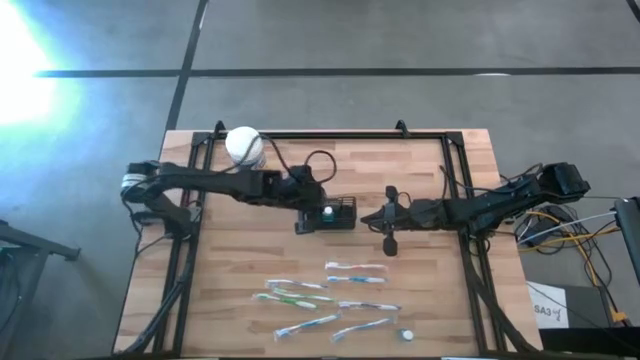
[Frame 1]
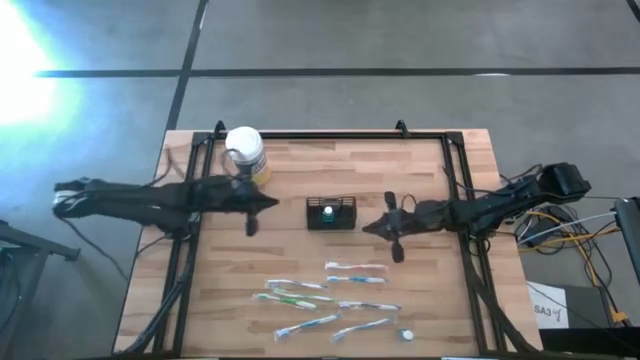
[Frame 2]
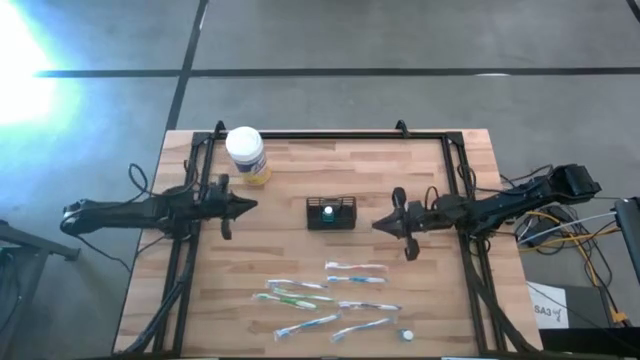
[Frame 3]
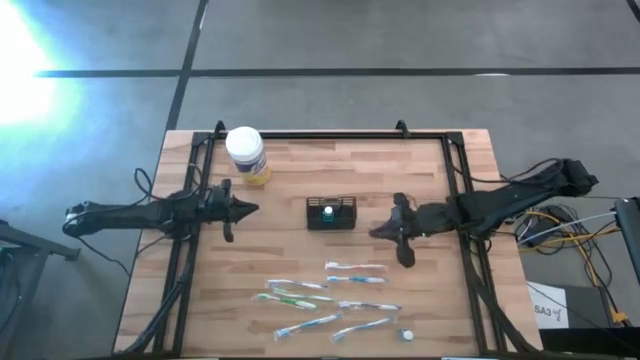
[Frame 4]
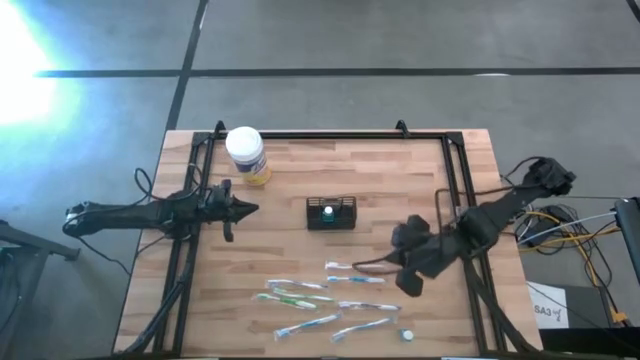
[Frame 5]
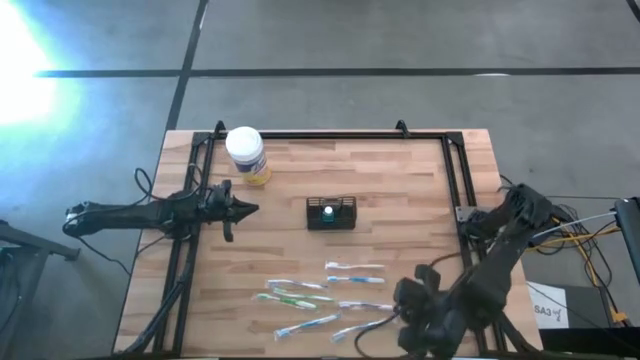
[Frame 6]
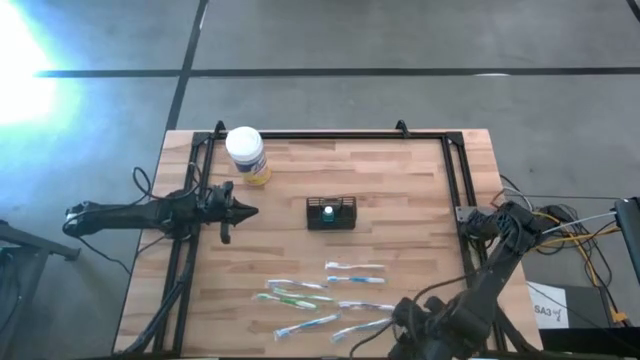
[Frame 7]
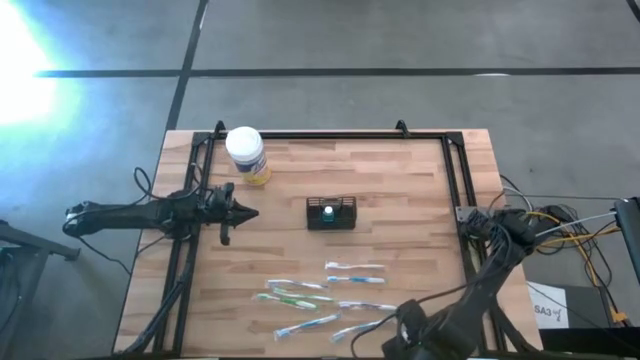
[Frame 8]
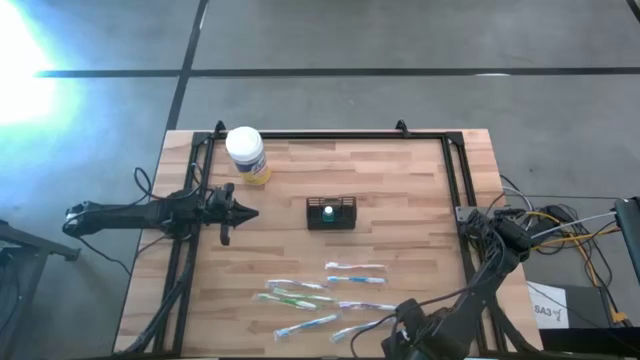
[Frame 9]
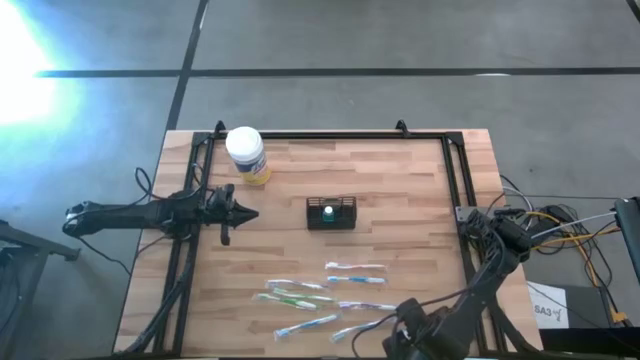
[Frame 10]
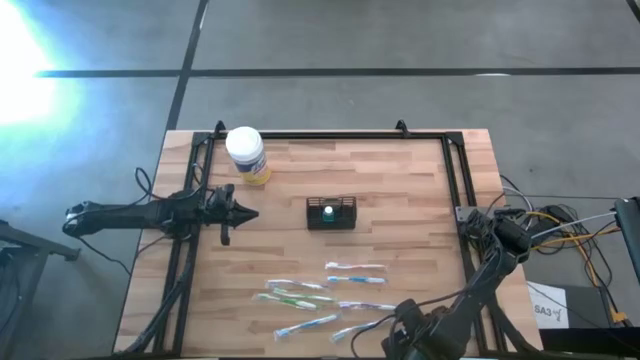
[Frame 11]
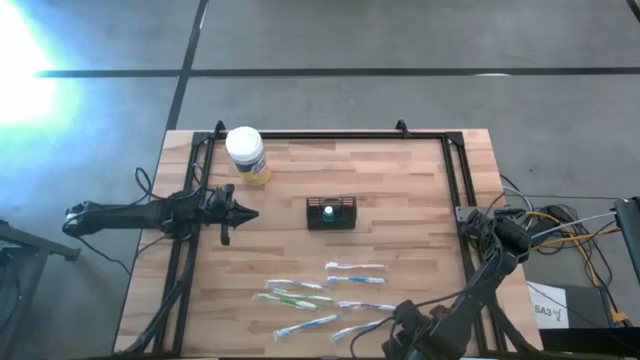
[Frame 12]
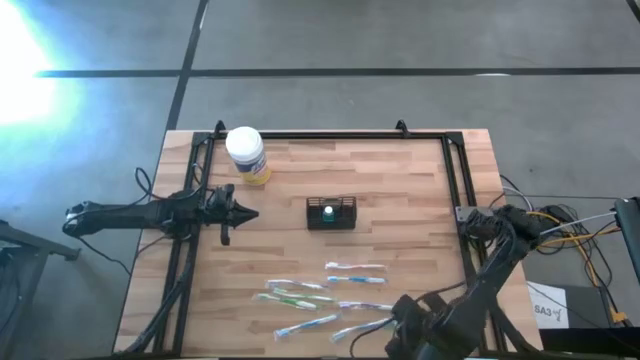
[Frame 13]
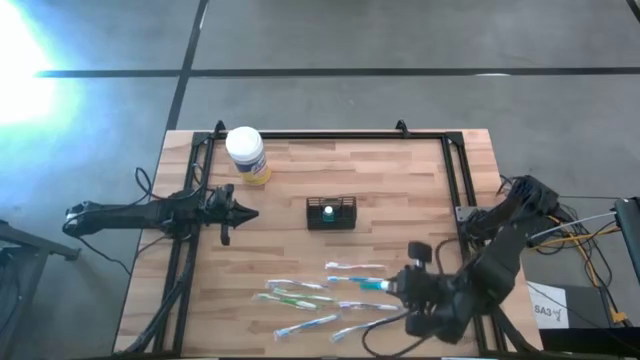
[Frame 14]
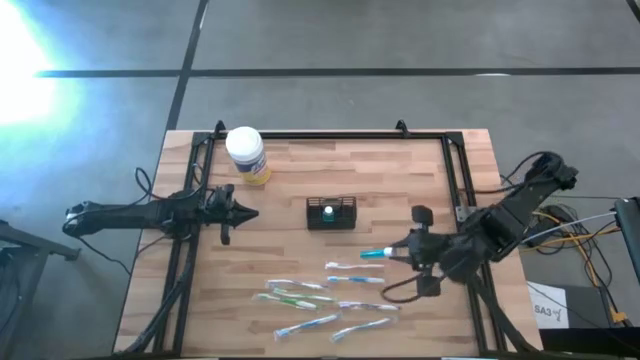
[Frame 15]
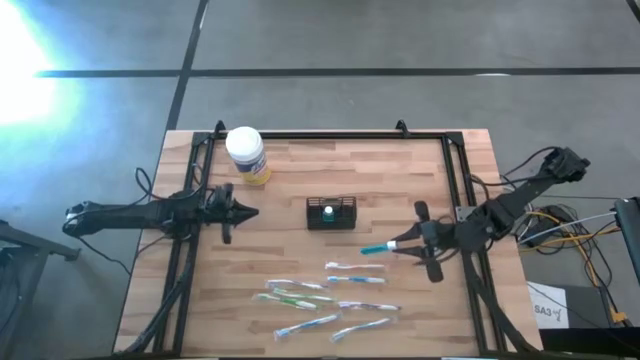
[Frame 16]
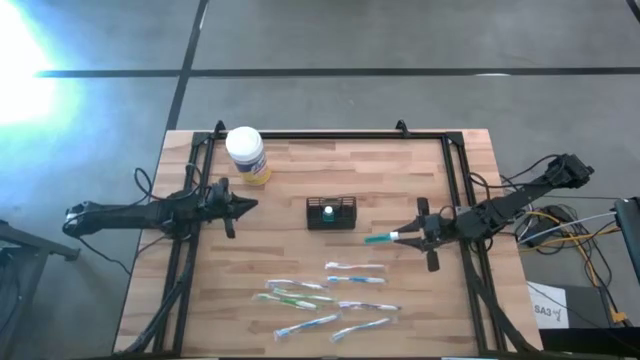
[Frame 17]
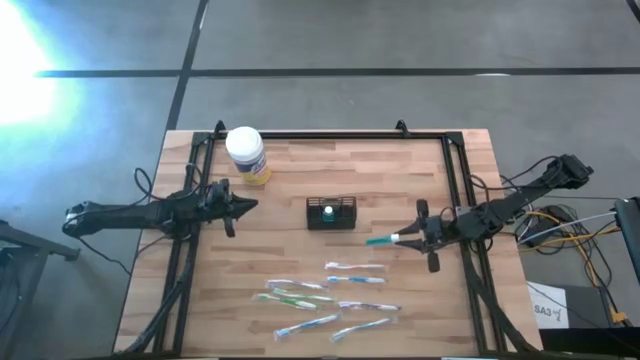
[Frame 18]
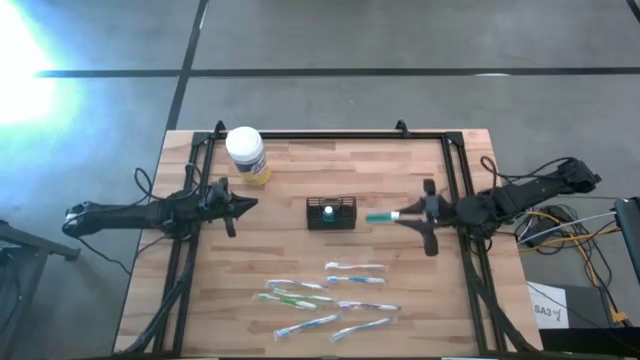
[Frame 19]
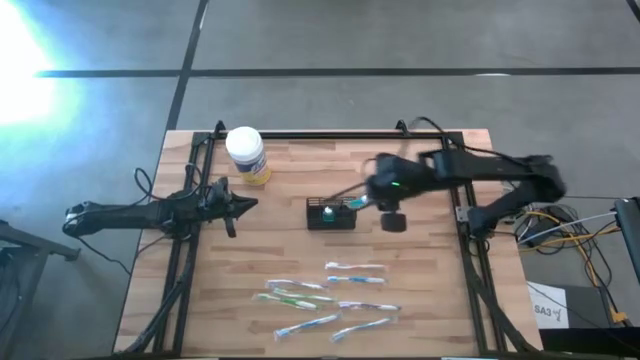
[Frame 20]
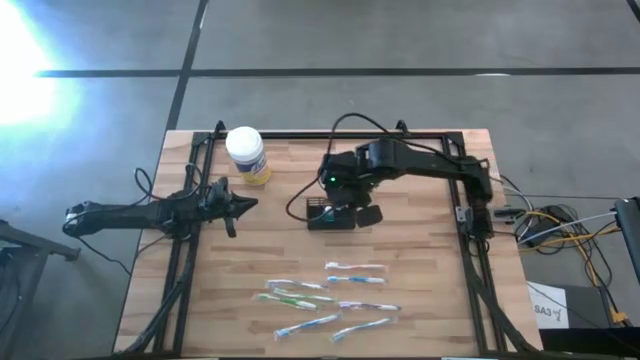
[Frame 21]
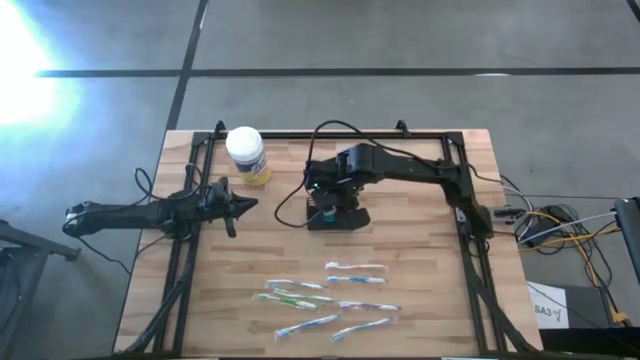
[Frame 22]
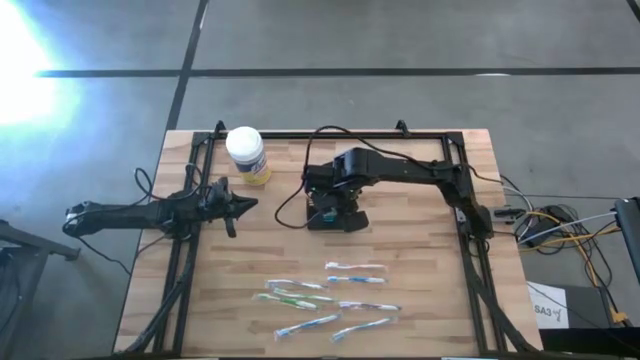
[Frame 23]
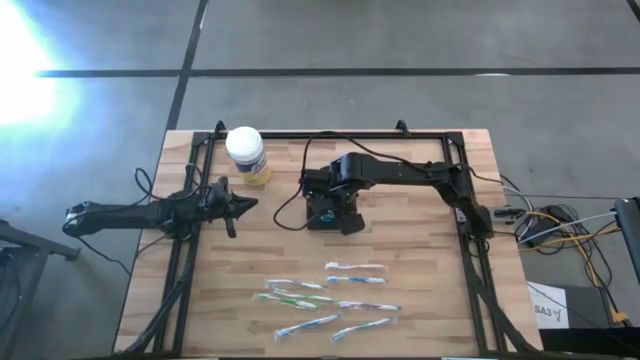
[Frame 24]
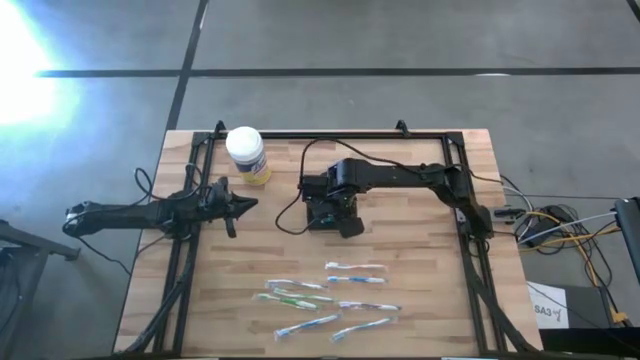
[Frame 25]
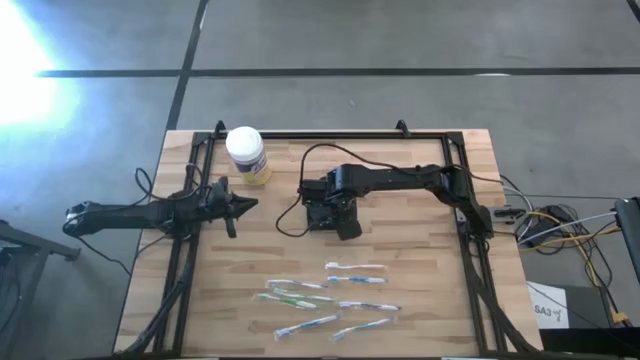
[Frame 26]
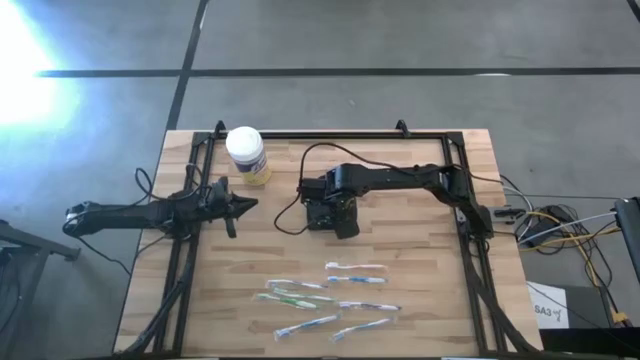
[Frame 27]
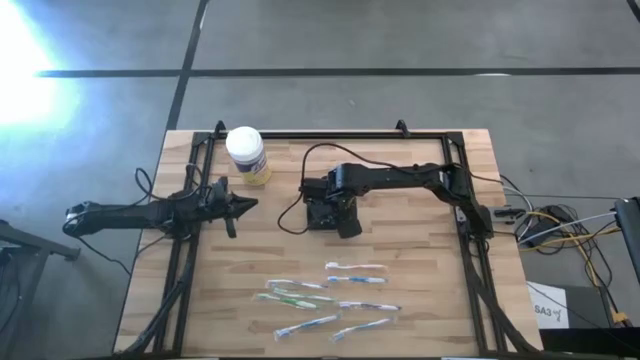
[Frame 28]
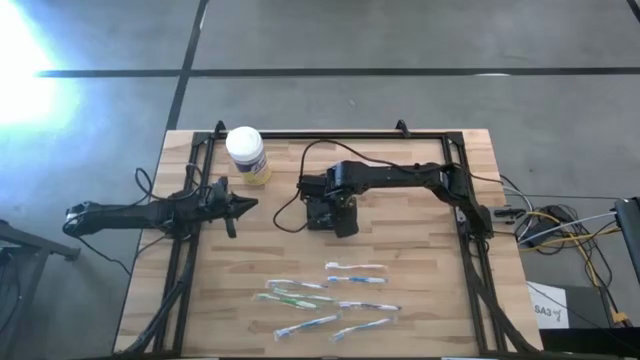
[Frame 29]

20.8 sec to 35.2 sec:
Task: Pick & Place toothbrushing station
Put the blue mouthwash into the black wire organizer

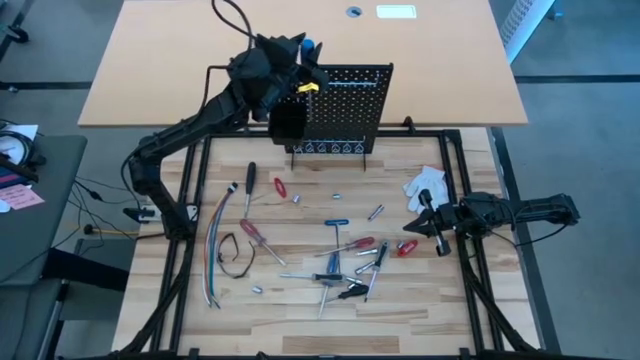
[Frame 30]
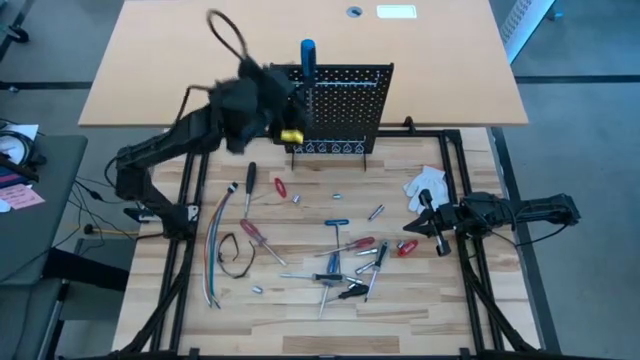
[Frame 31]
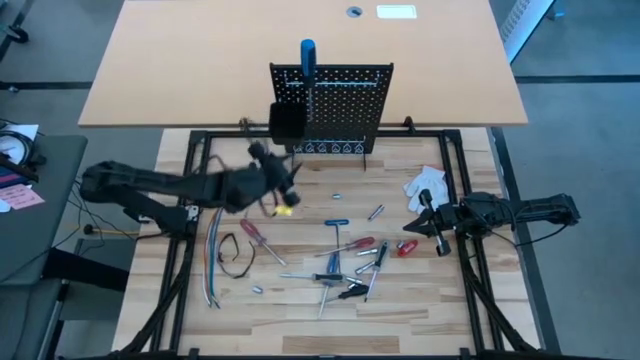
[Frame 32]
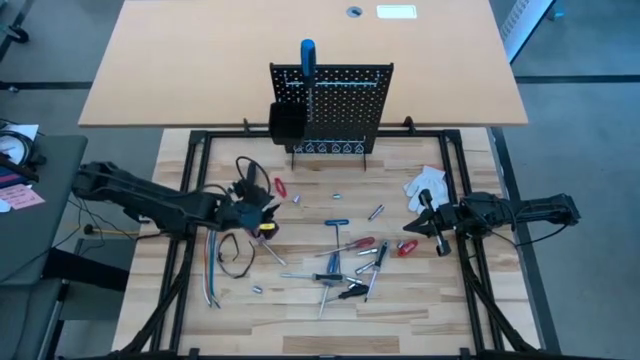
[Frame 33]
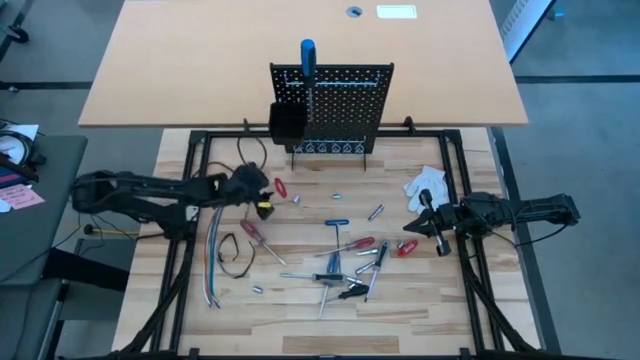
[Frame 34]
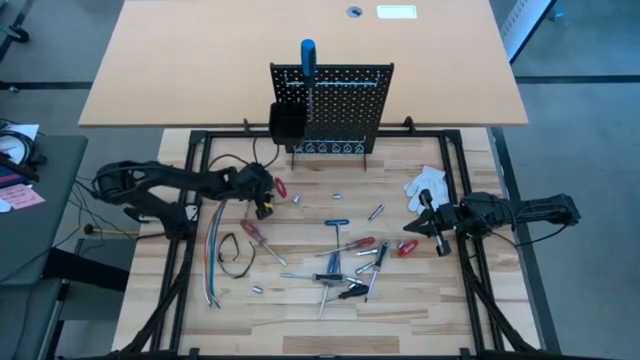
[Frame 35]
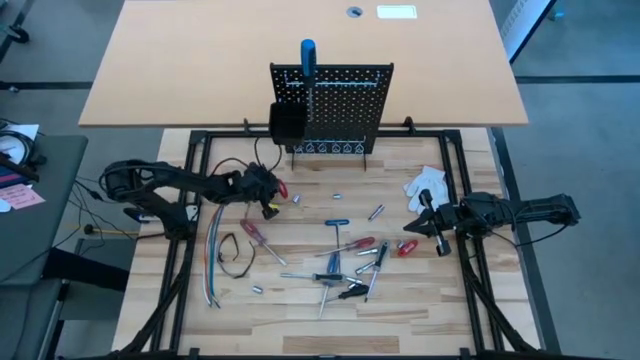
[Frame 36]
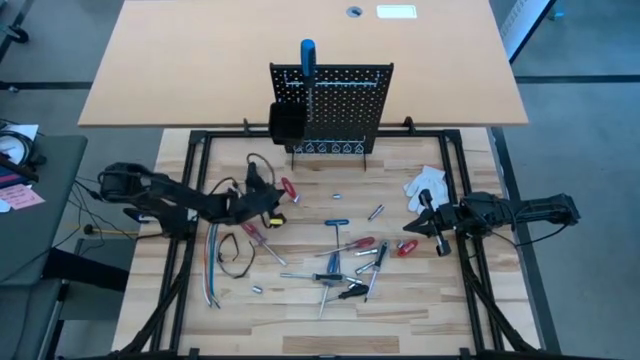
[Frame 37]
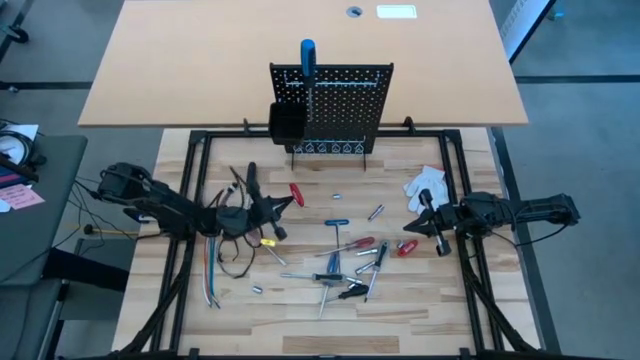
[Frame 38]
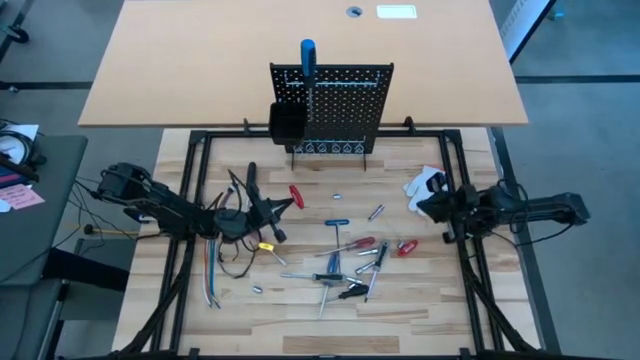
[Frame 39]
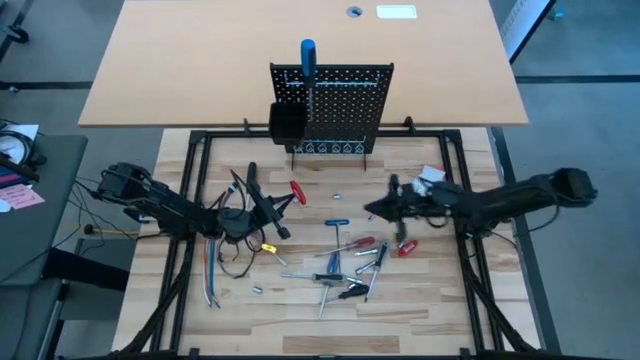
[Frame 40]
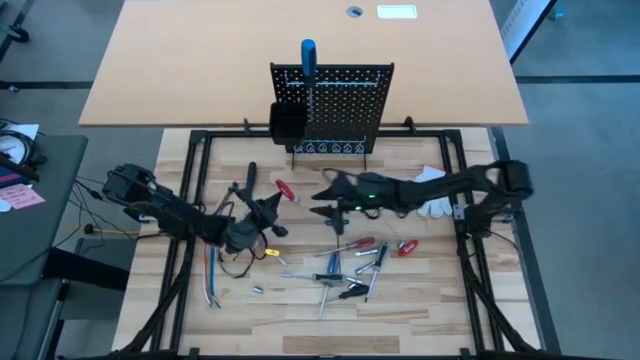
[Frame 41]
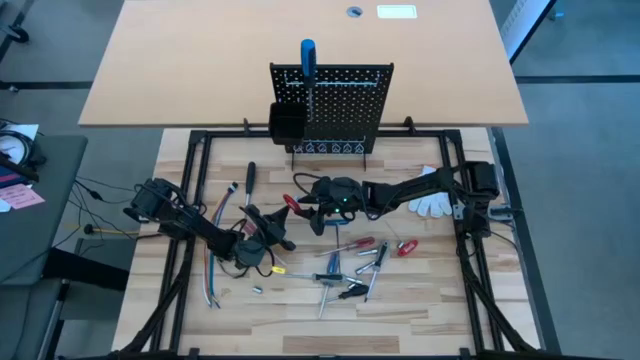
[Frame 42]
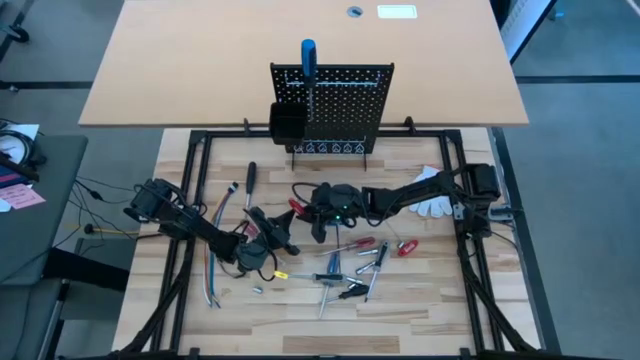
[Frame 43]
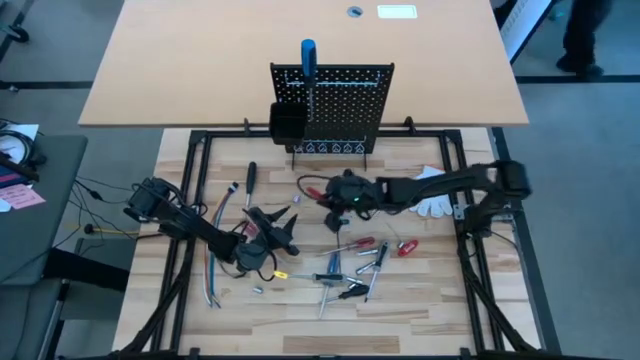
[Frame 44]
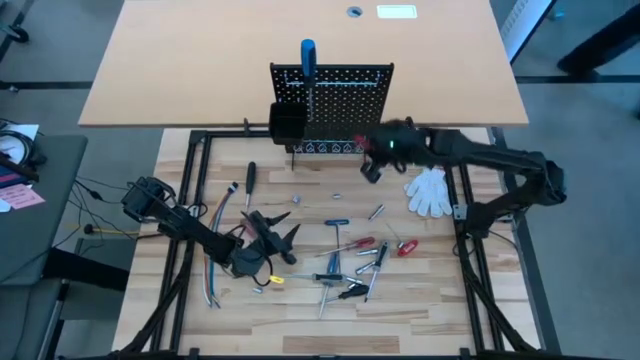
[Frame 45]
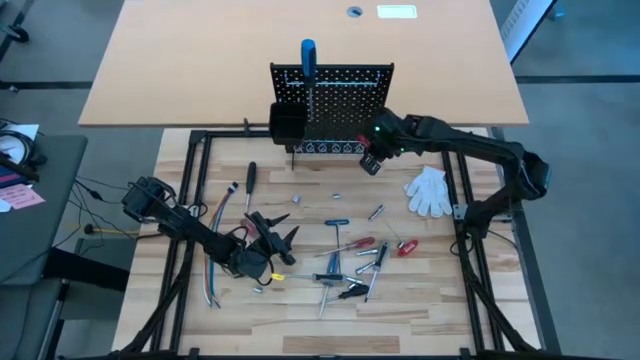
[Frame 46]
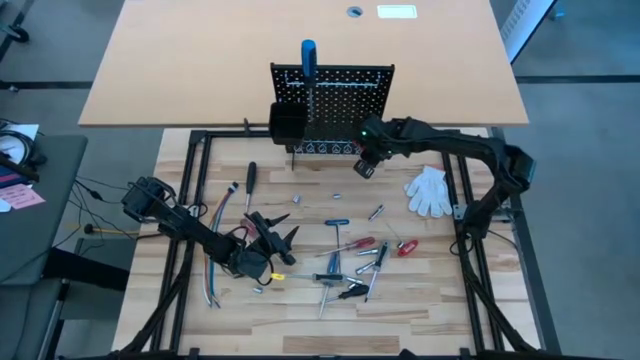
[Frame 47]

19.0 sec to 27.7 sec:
Task: Hang tools onto peg board
Hang the red allen wrench on the black pegboard
